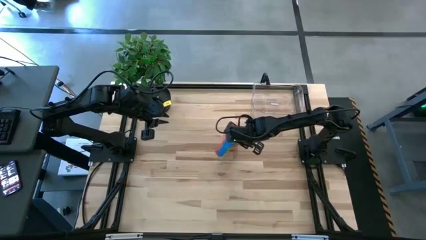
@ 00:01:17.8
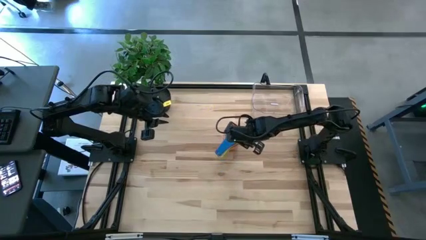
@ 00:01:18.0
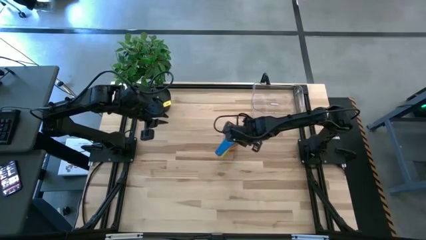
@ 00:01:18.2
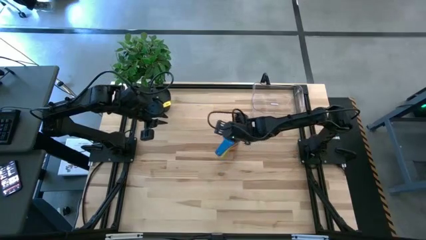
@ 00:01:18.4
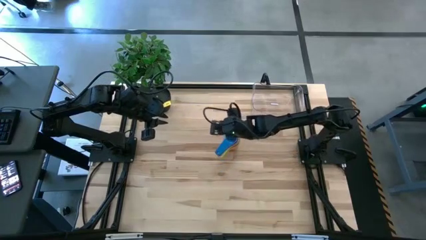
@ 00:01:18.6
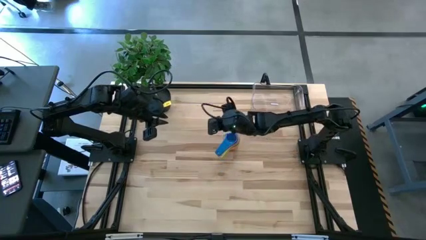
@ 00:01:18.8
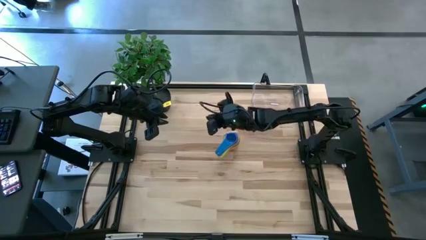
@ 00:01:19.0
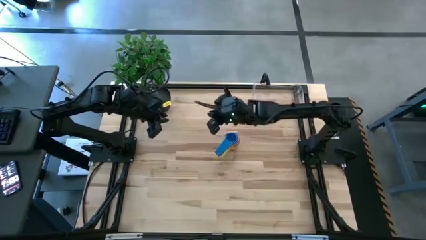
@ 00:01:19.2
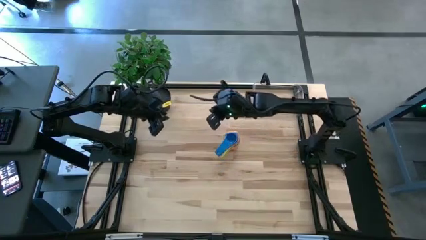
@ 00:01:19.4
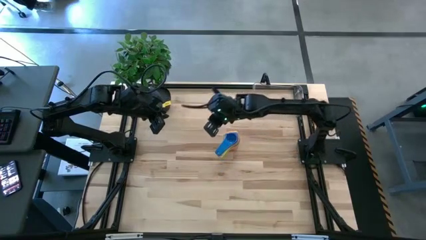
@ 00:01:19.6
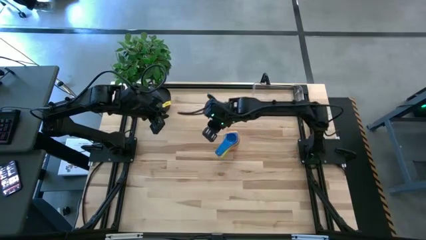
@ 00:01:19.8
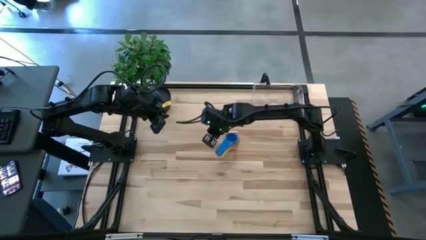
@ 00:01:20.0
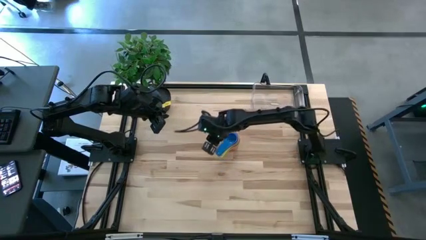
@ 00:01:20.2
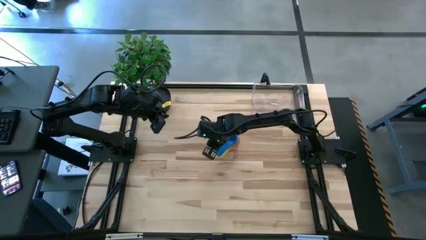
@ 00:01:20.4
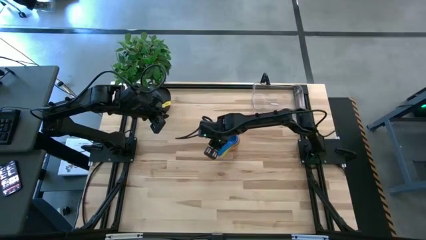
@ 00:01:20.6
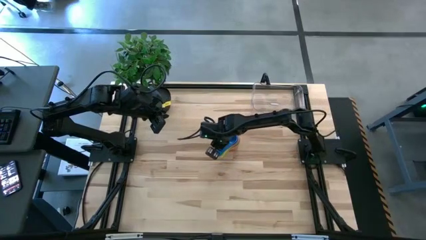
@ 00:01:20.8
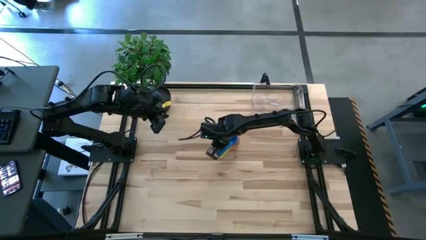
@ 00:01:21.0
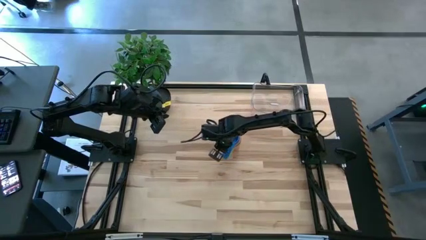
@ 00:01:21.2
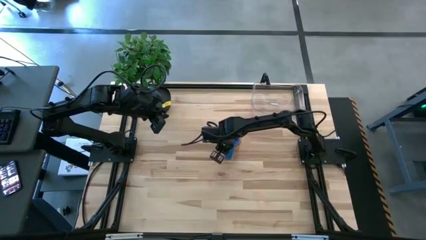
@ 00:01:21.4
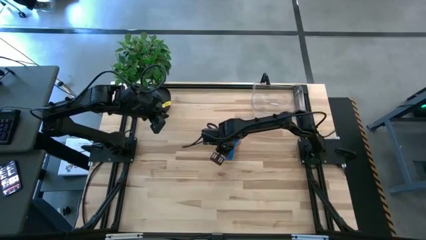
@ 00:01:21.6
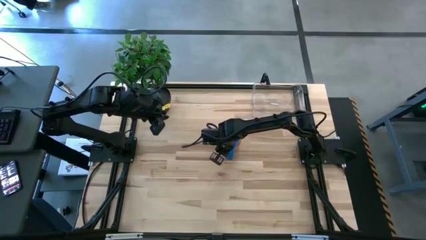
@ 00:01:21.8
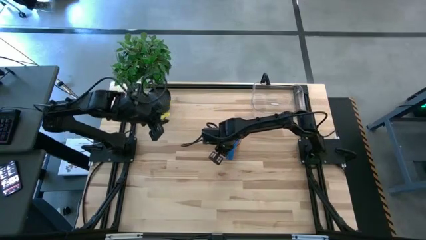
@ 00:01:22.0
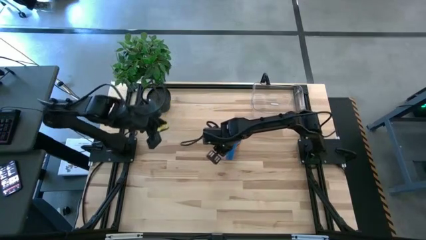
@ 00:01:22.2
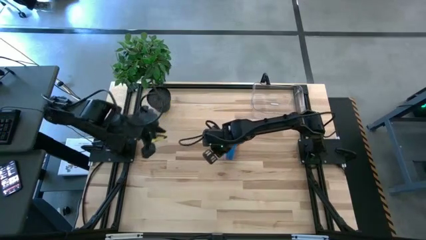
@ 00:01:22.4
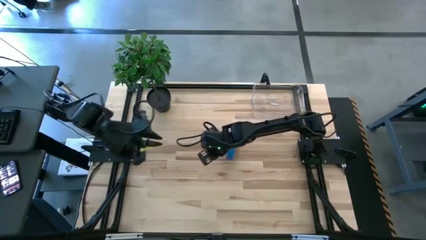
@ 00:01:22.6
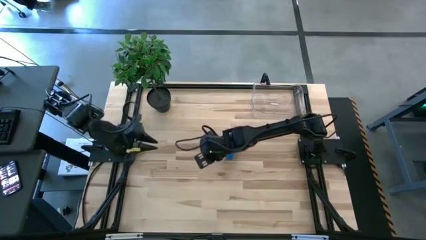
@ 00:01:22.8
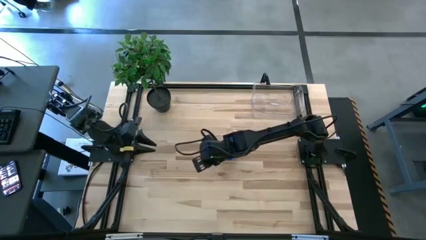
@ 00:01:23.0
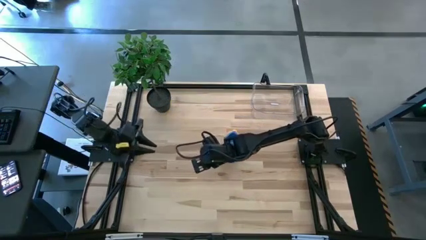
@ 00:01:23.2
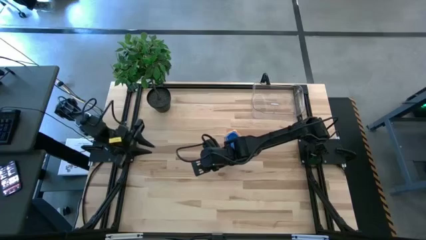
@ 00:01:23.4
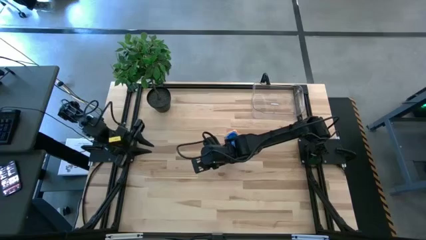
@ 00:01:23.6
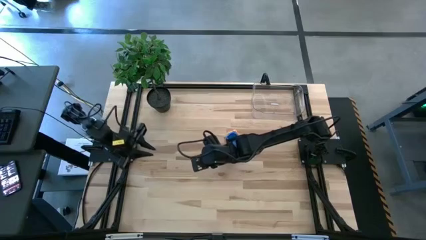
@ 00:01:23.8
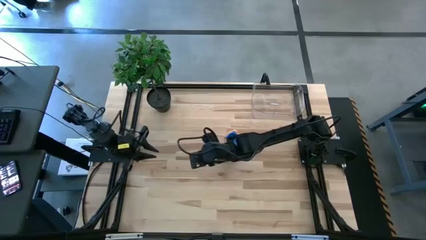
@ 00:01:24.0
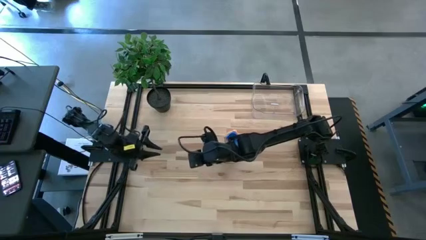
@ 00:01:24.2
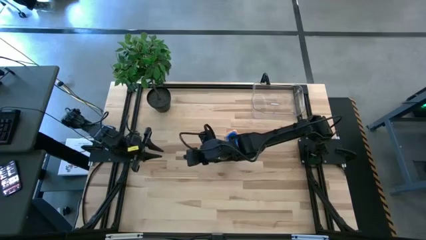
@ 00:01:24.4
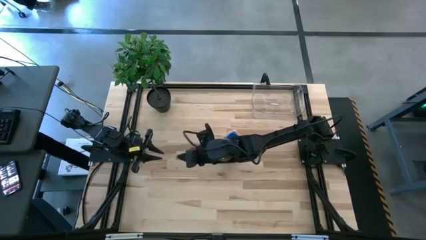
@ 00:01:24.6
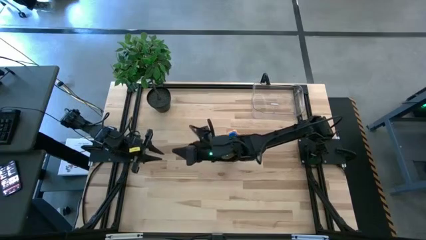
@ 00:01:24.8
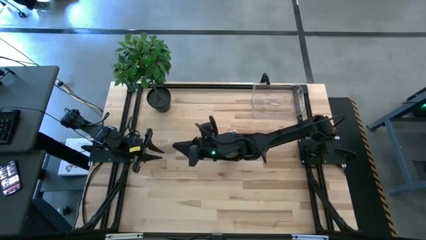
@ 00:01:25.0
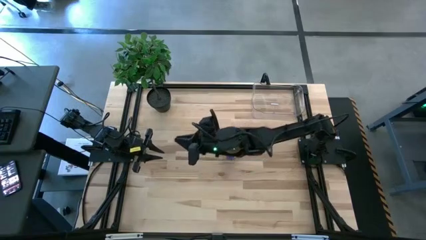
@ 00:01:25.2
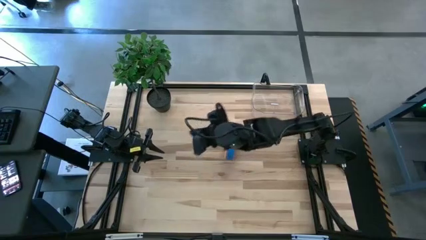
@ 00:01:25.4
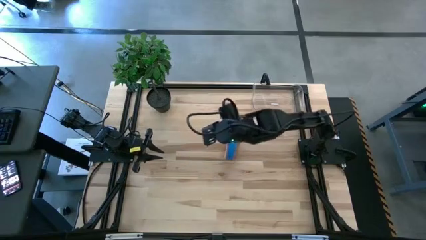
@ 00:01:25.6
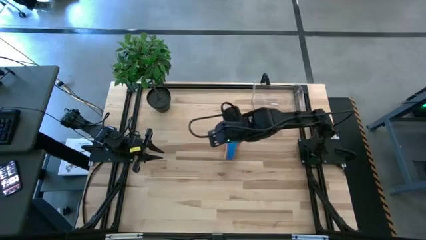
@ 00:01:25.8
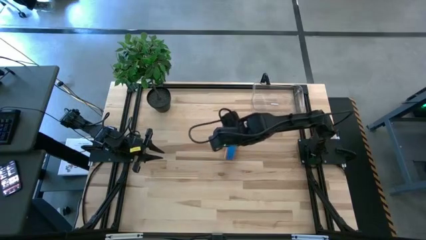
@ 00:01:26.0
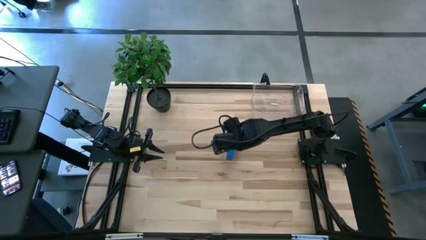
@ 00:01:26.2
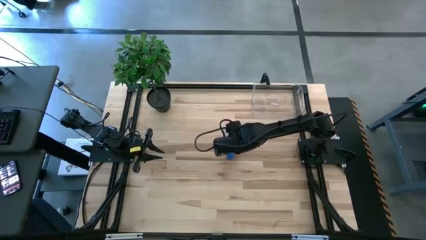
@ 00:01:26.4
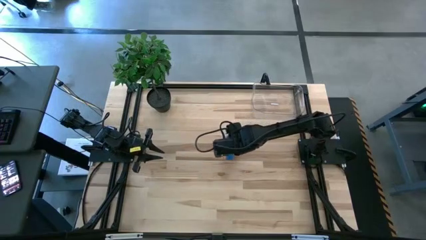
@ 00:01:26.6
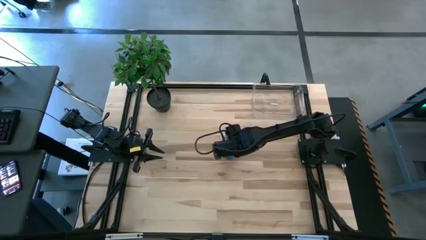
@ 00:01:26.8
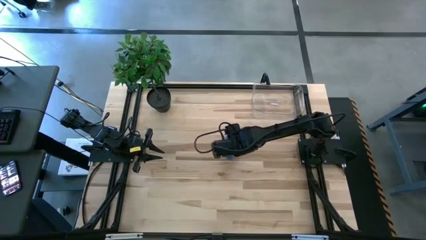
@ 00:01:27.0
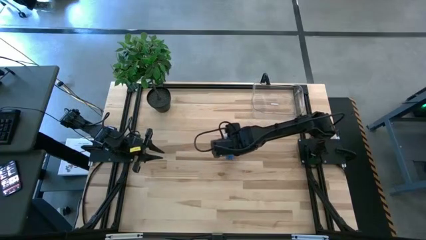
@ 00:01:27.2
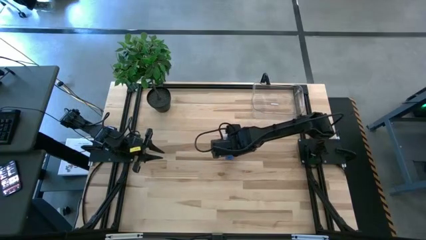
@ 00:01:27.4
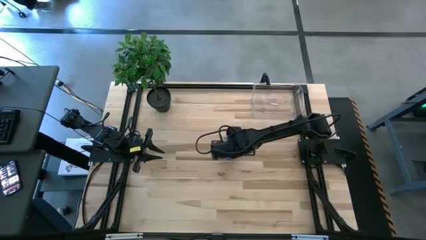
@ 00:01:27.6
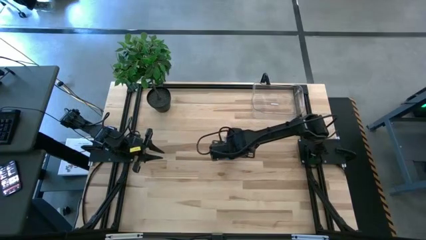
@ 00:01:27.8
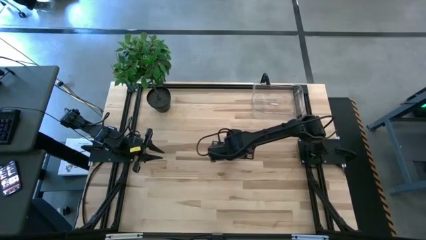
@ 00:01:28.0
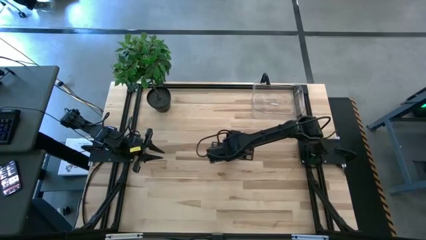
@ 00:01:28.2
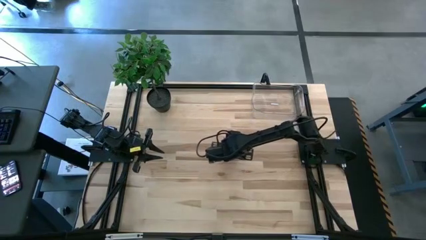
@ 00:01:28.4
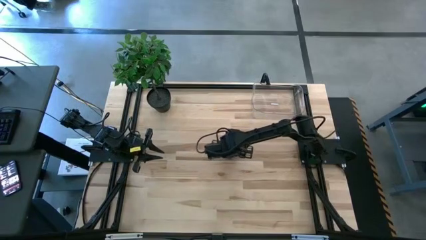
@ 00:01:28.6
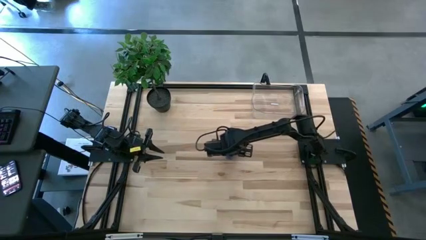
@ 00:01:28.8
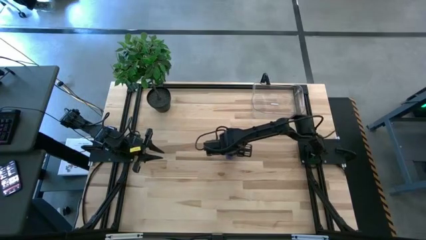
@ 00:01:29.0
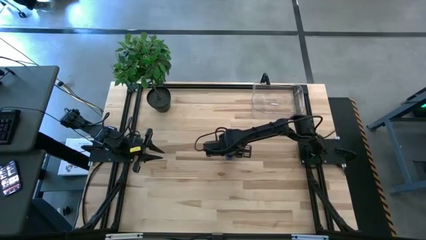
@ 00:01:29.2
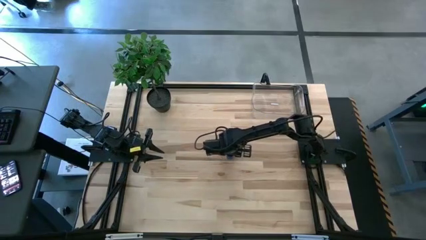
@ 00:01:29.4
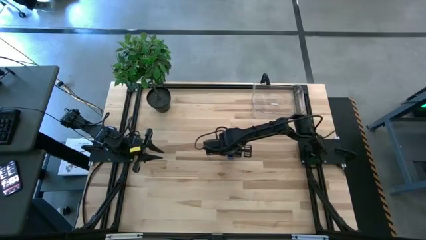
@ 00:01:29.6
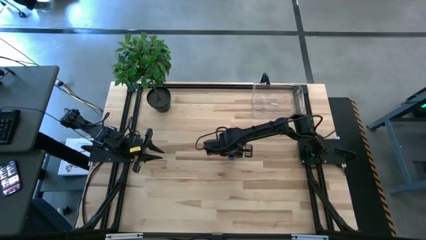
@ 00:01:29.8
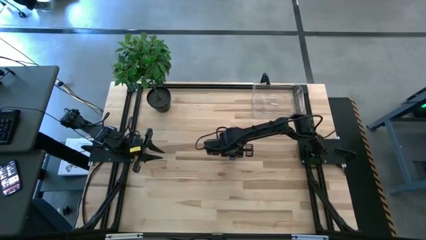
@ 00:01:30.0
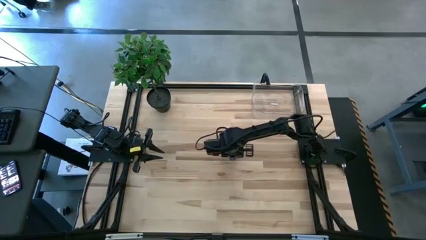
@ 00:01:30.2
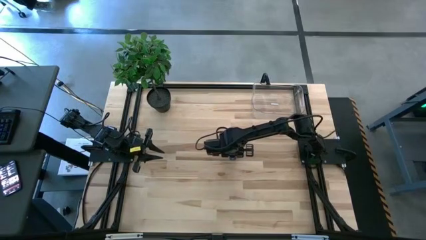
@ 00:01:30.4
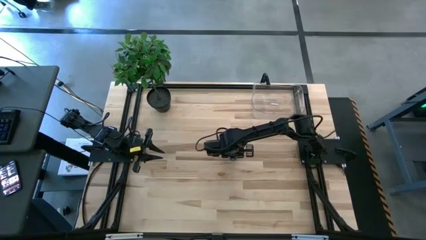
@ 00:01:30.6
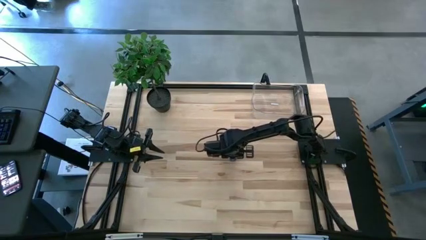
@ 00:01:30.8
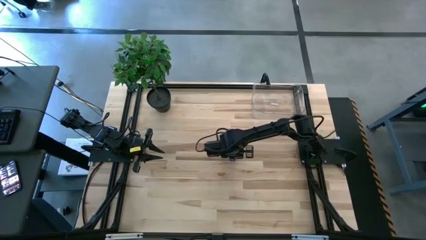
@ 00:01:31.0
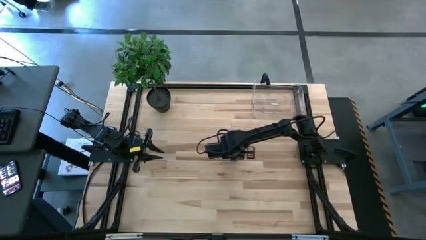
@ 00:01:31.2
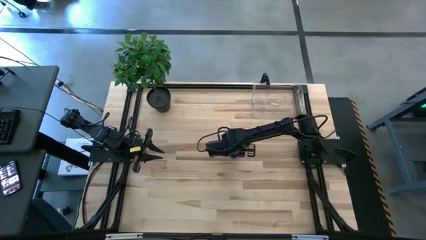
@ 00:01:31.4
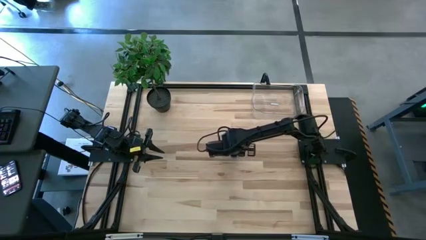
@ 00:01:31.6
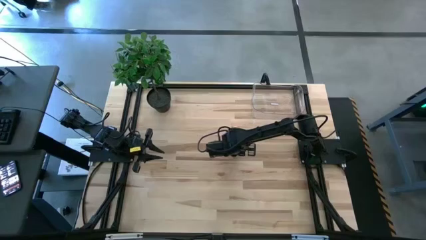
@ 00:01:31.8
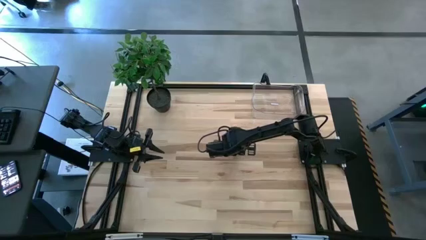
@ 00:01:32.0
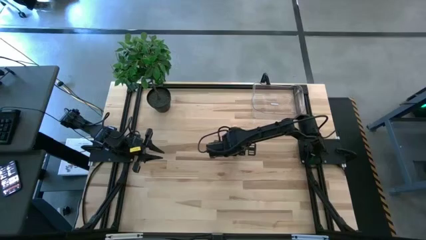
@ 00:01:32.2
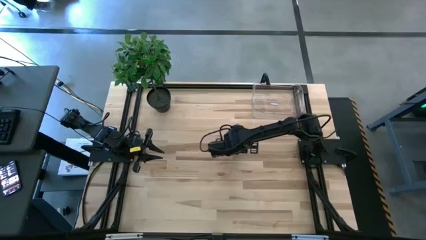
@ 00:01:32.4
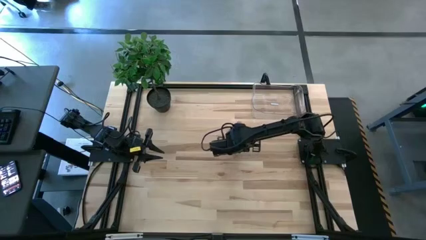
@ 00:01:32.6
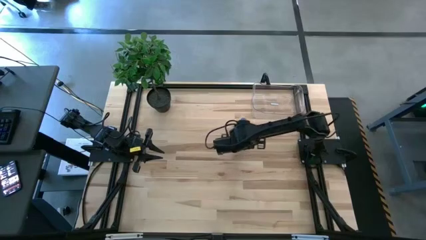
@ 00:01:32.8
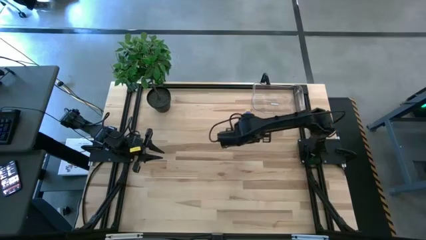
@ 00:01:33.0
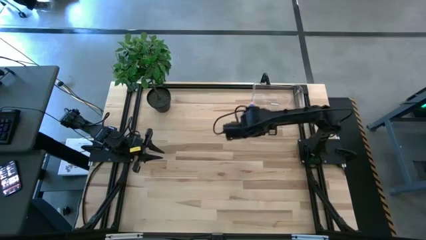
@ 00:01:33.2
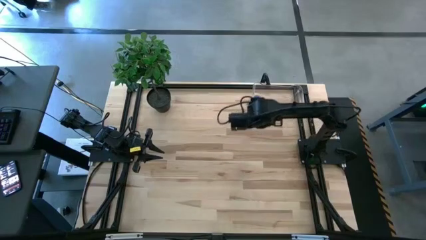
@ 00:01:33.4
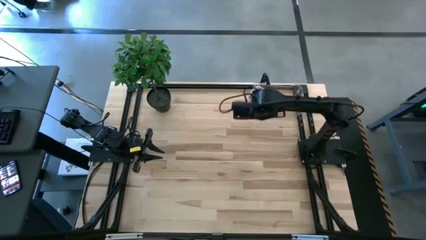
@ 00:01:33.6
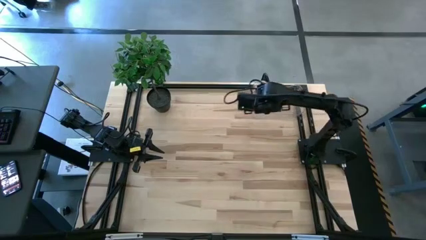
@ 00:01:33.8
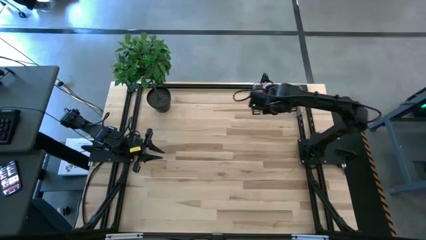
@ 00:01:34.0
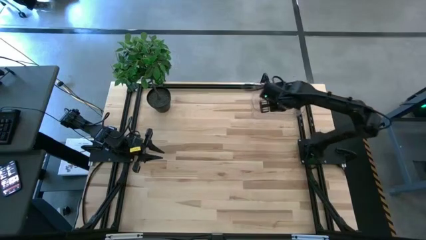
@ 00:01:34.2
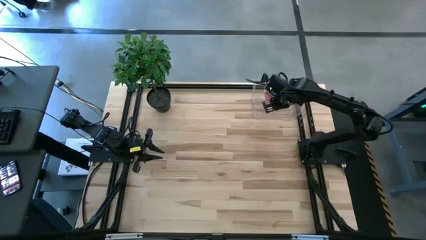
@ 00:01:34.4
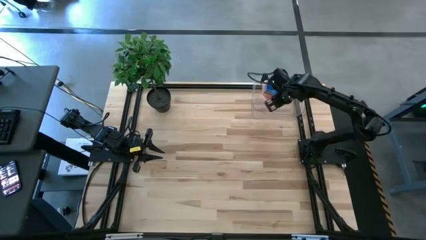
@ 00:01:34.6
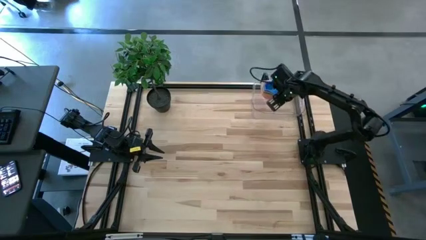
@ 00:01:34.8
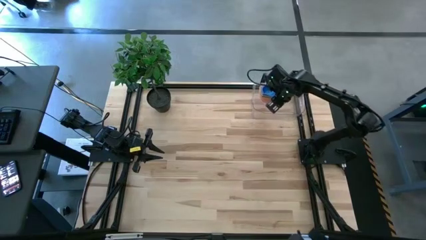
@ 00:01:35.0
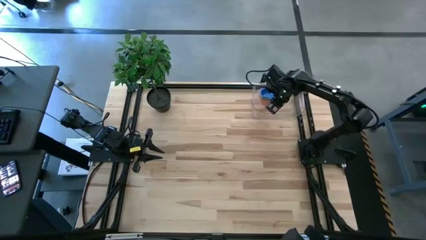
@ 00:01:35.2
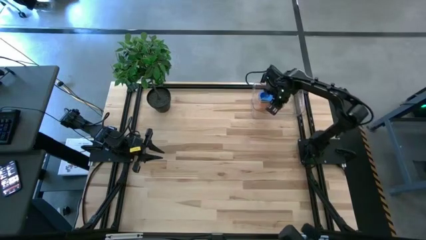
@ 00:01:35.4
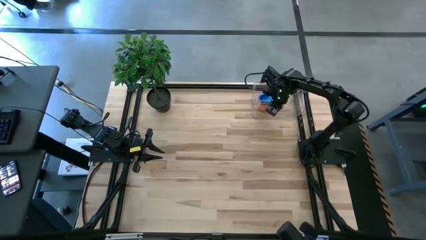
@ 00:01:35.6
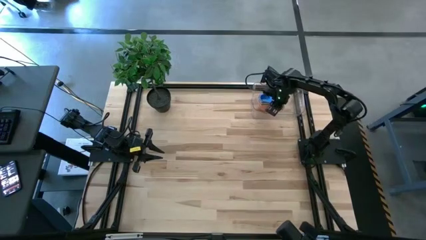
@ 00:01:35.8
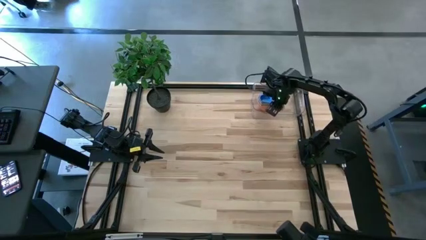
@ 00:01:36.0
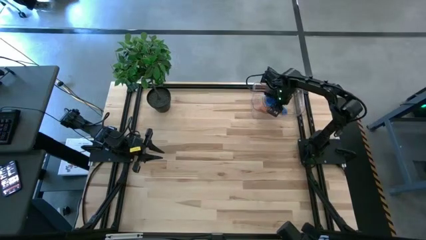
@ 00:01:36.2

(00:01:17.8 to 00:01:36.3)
Task: Nest measuring cups in basket
Put the stacked measuring cups into the transparent bin
